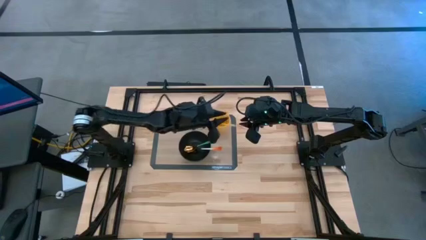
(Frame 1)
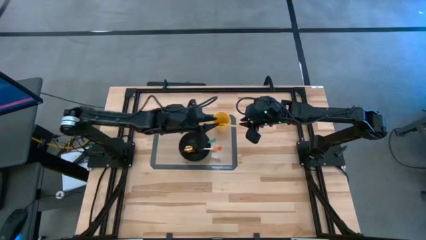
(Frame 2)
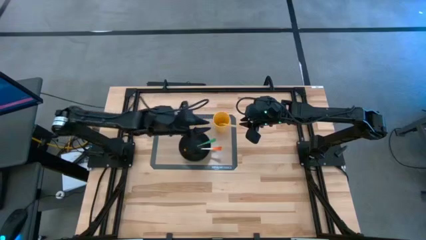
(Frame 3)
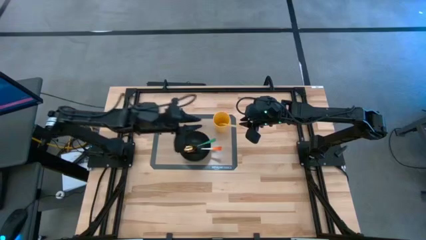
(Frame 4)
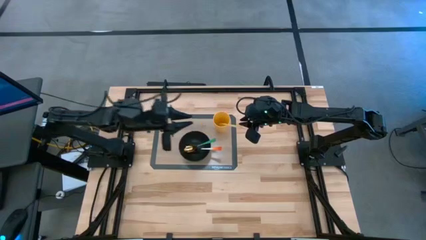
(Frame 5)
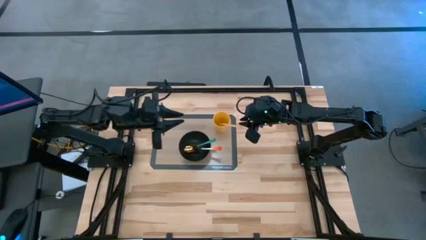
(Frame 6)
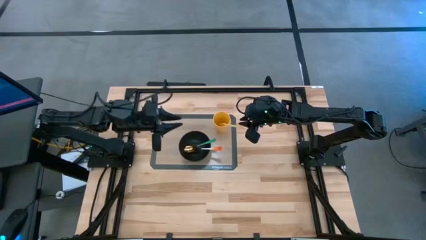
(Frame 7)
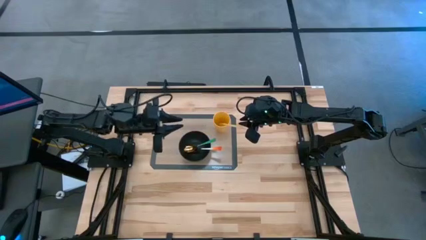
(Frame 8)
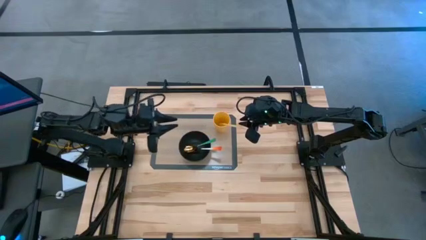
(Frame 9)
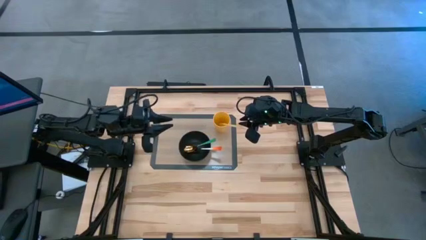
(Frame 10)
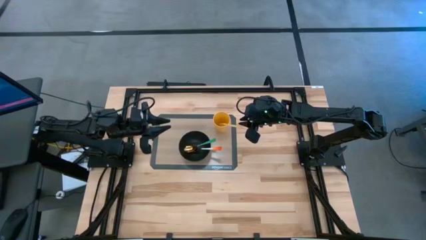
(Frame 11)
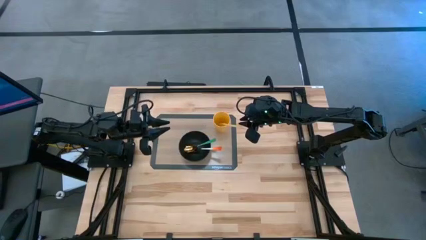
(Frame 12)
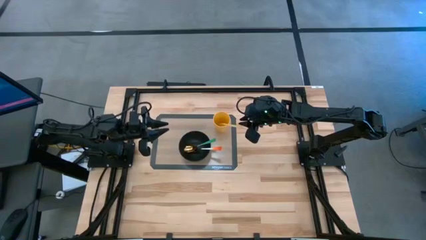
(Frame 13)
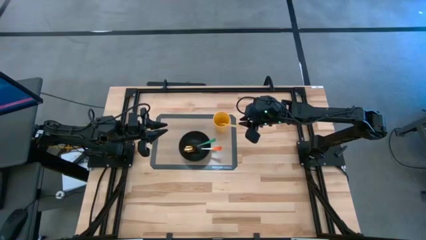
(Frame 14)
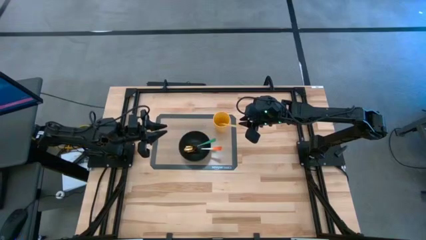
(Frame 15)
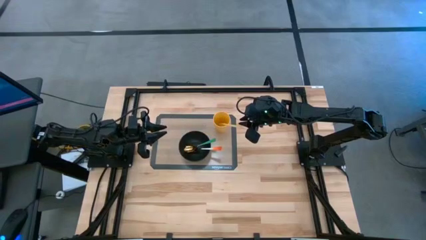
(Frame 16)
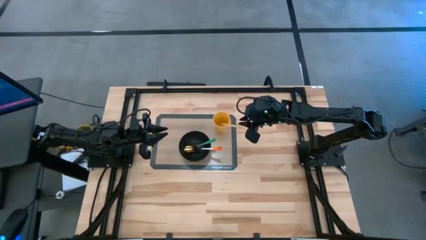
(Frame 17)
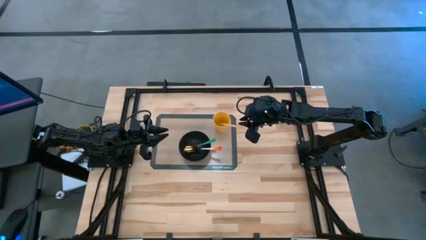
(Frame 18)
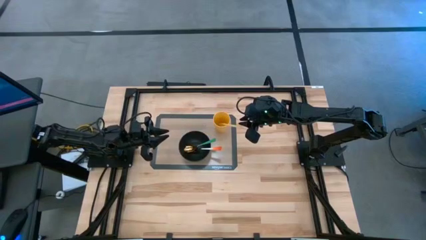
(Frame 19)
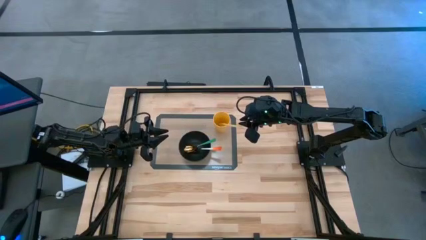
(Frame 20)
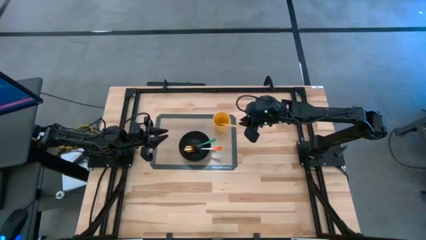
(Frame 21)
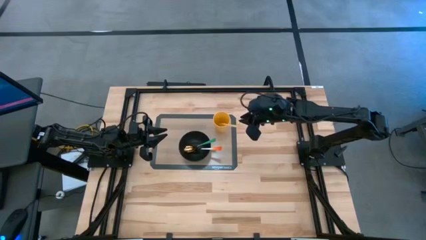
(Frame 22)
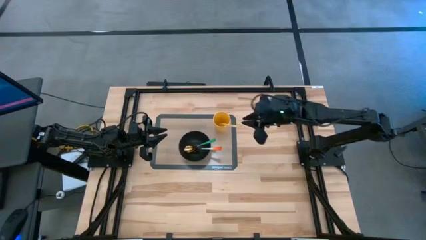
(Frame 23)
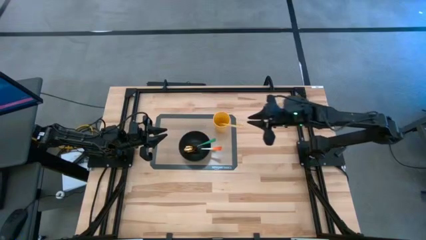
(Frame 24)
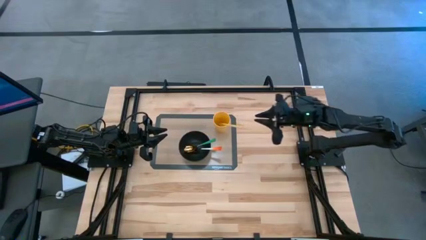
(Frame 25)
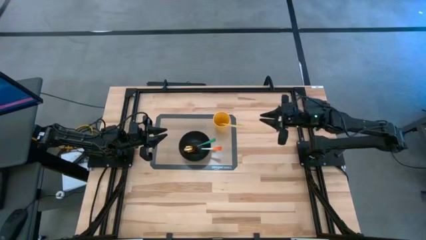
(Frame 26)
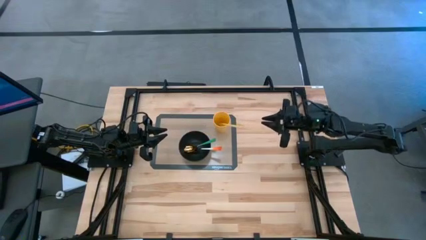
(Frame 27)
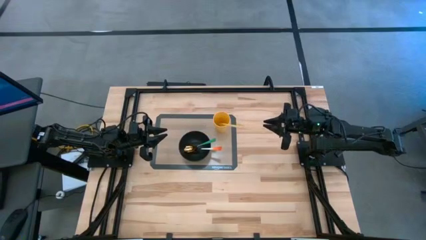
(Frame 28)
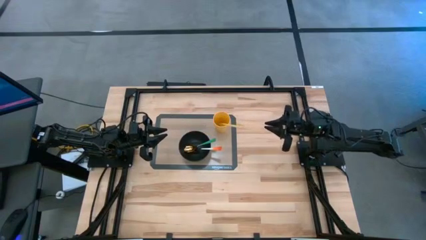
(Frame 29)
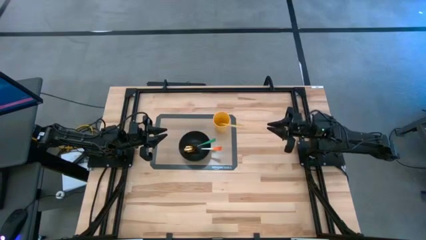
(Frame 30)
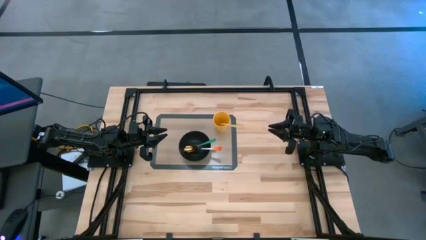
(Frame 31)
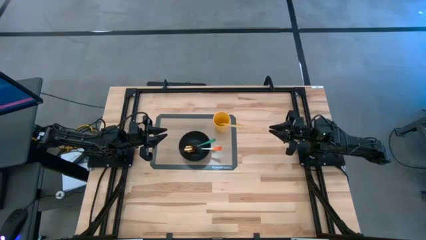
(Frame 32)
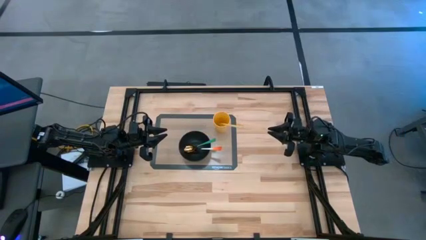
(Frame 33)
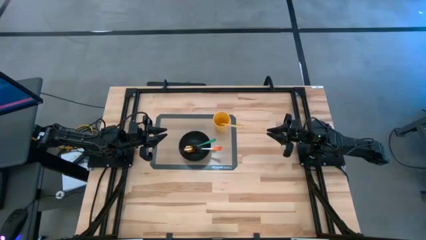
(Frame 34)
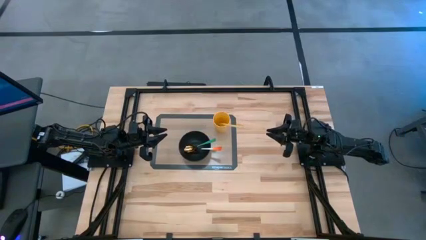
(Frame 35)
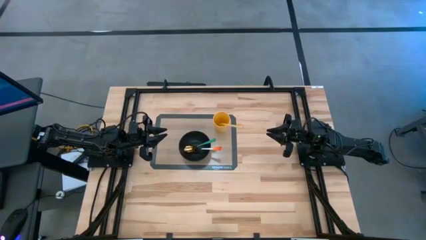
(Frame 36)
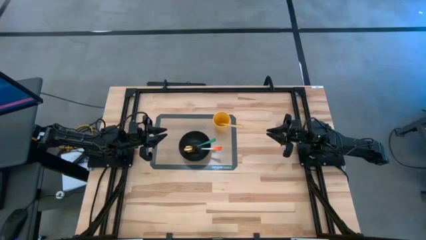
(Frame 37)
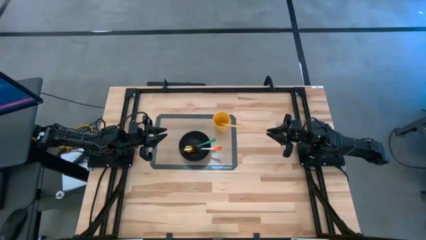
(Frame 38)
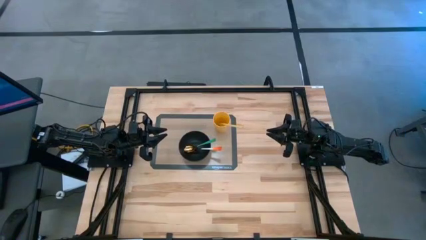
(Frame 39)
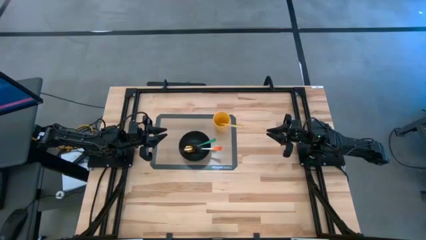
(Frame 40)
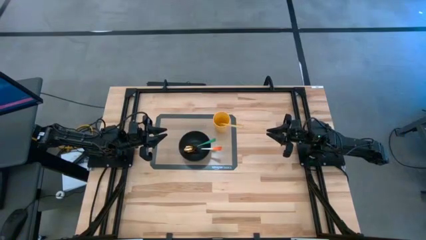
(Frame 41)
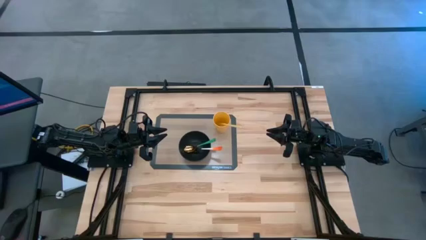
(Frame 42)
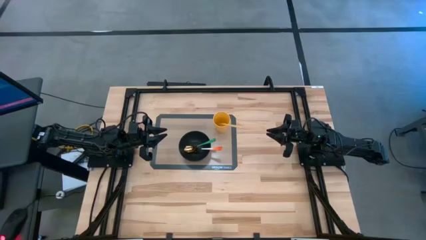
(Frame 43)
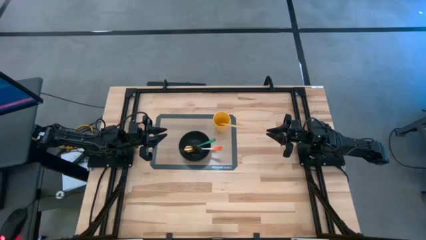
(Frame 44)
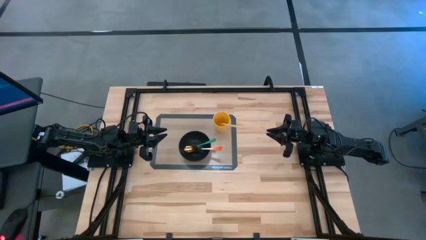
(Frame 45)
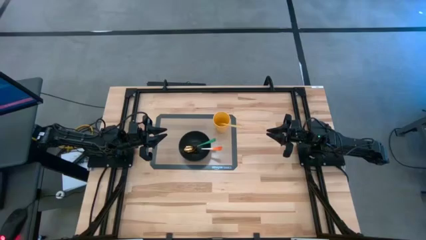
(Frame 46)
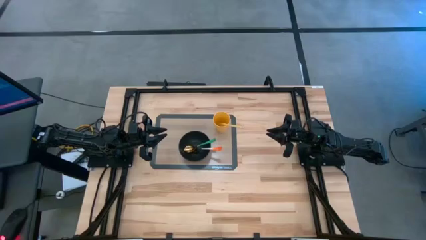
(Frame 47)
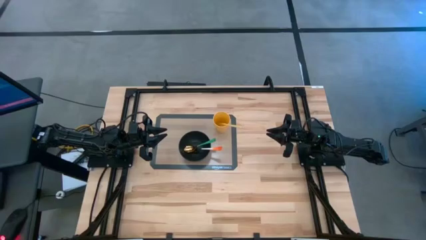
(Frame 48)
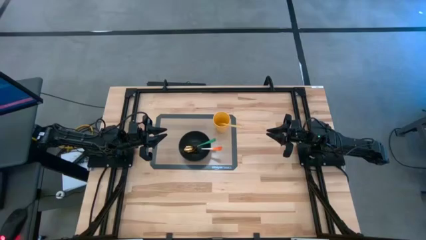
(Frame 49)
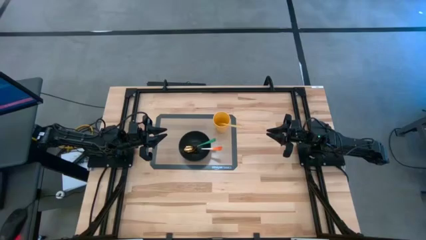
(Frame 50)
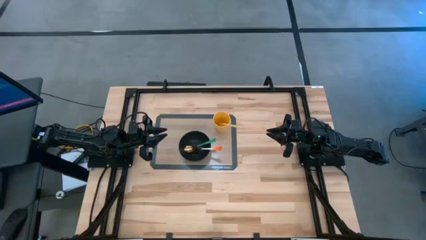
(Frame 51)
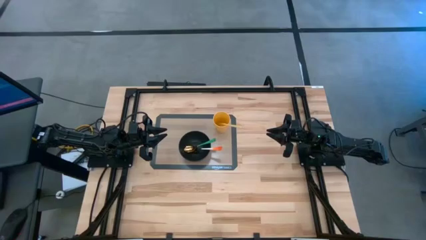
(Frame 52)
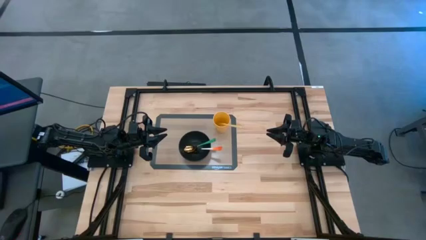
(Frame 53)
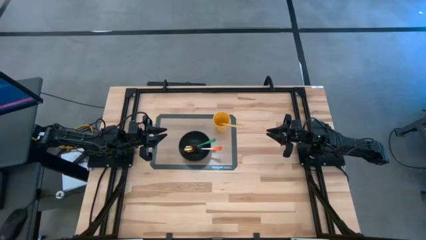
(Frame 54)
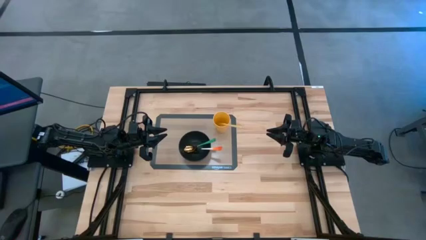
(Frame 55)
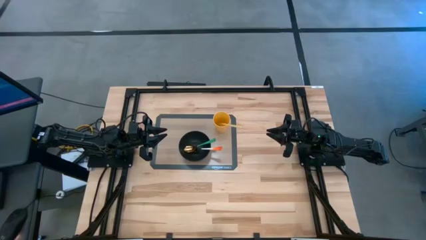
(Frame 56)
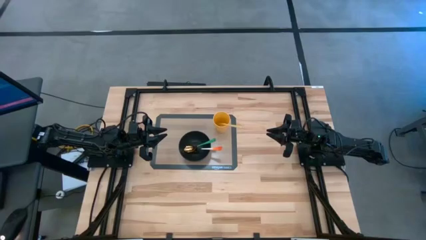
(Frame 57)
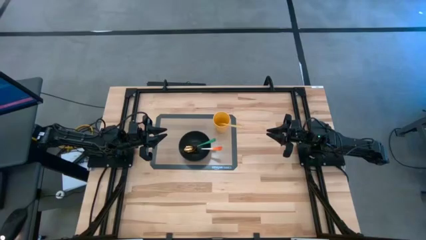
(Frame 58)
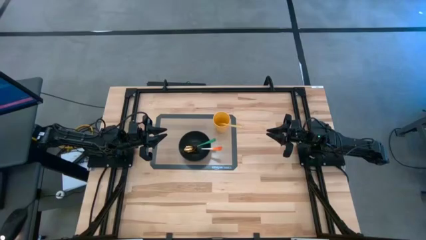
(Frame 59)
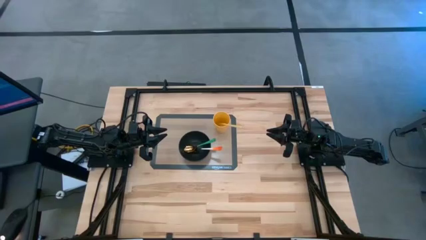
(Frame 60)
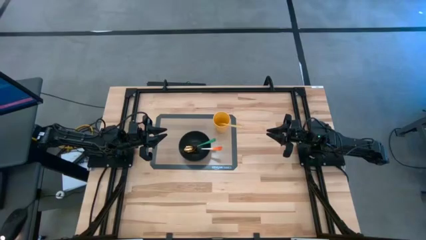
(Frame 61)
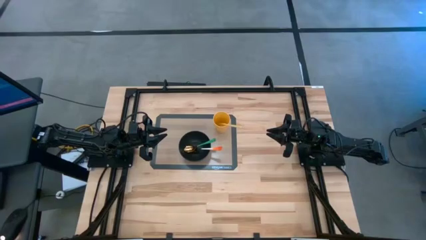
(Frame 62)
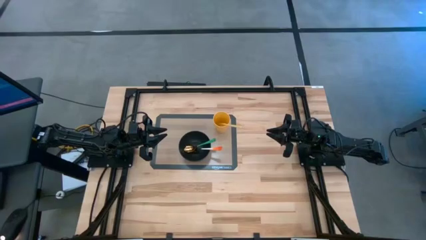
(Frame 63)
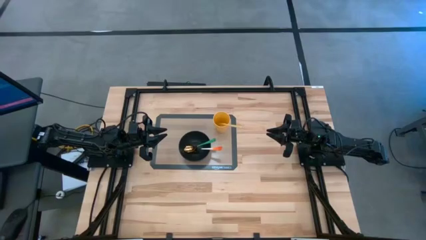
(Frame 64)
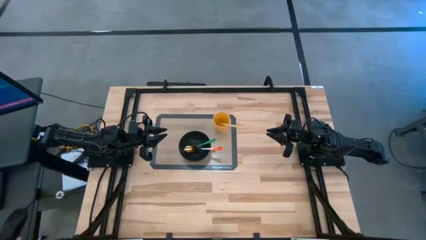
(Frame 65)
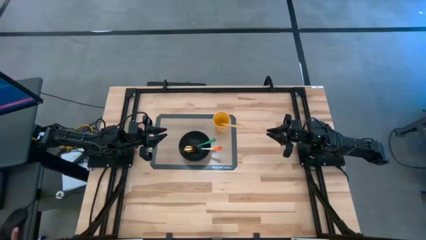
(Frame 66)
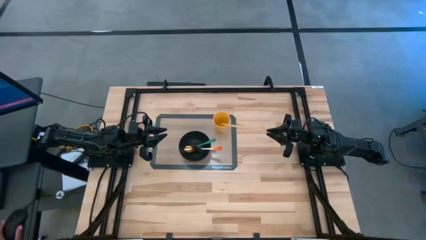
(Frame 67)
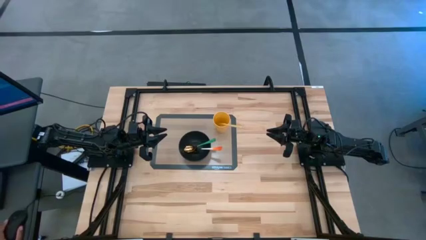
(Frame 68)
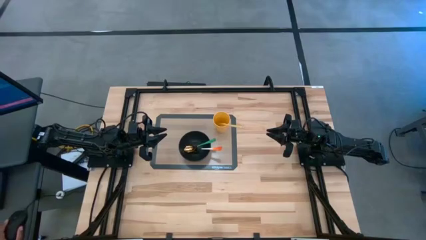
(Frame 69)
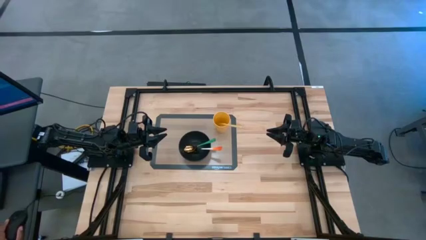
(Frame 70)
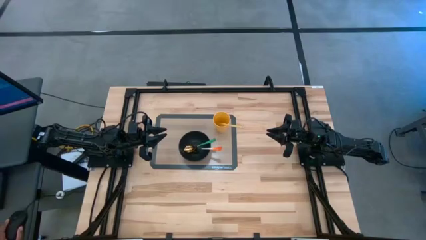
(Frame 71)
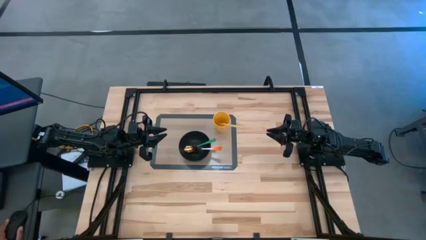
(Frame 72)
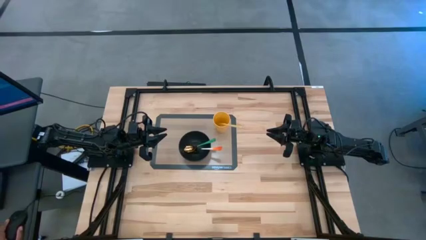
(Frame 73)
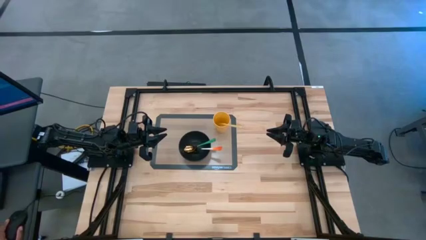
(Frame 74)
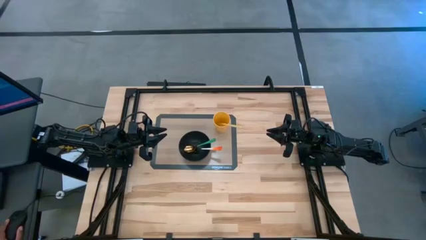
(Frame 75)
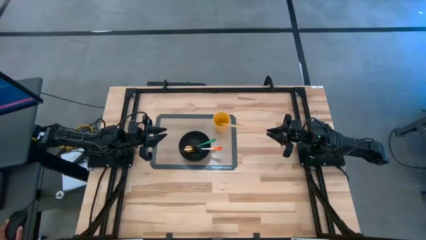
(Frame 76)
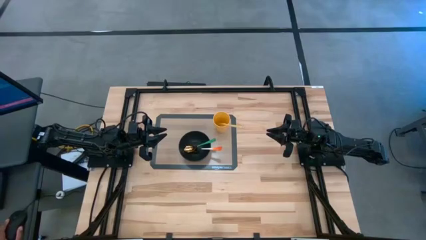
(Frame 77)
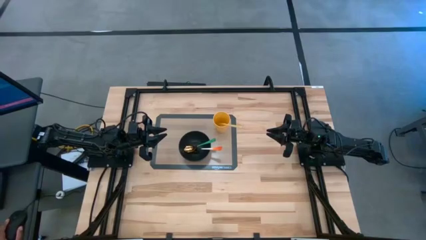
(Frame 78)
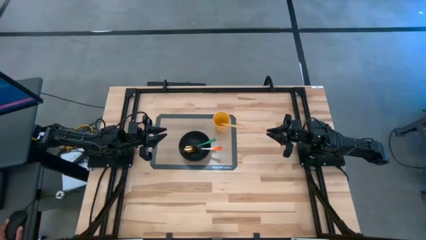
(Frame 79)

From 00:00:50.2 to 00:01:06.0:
Task: Pick & Place Utensil
Return to Home Position
